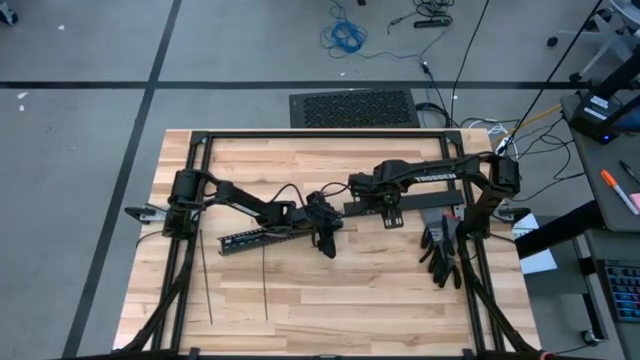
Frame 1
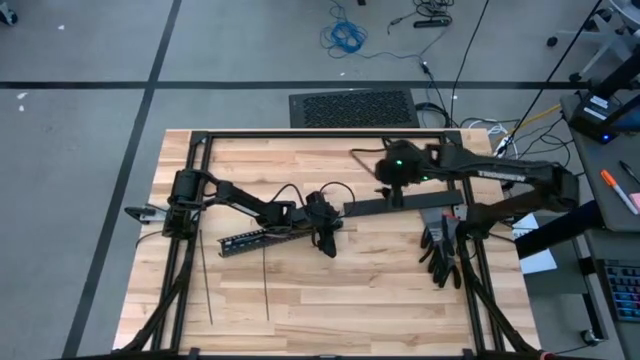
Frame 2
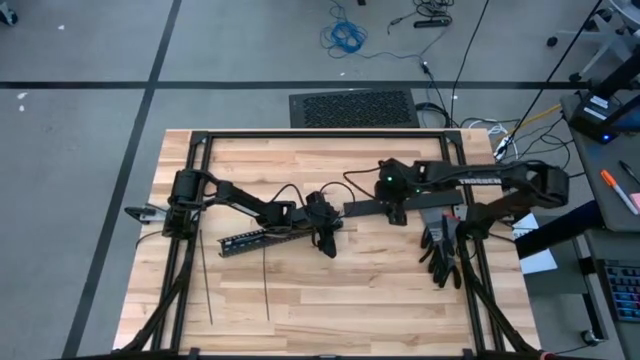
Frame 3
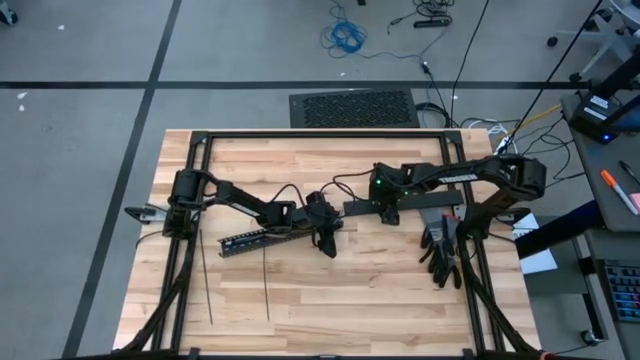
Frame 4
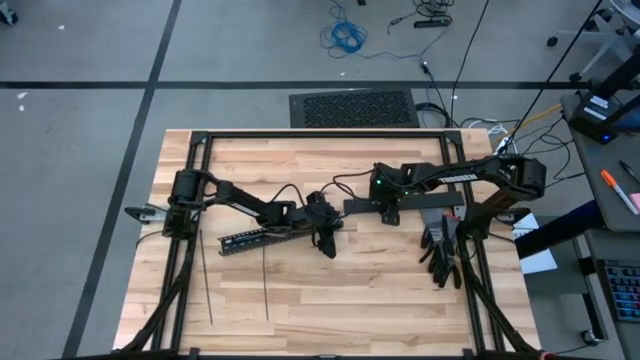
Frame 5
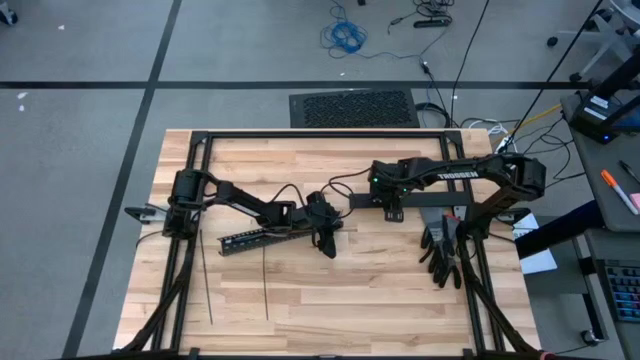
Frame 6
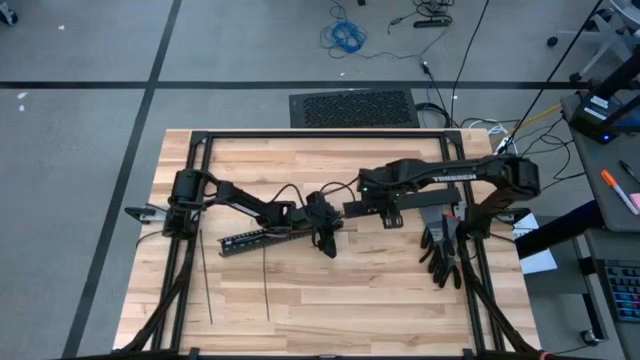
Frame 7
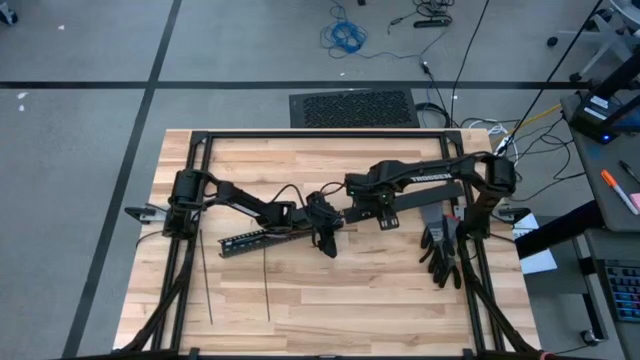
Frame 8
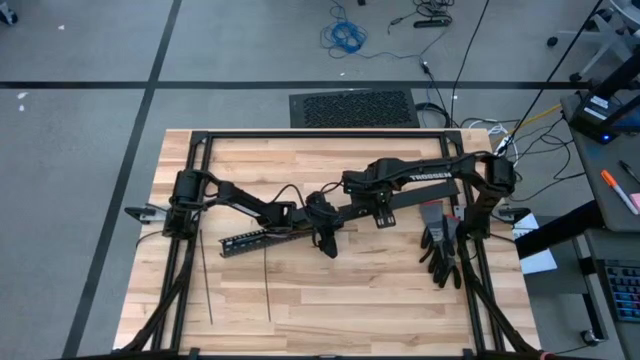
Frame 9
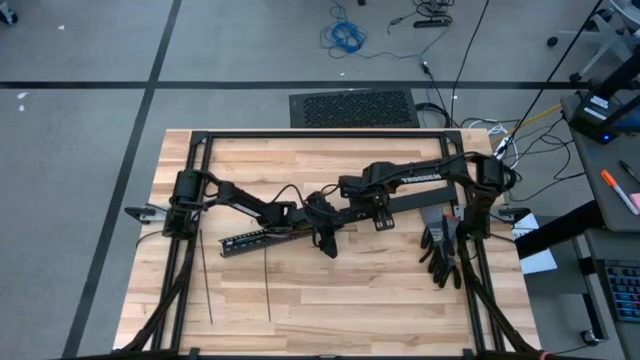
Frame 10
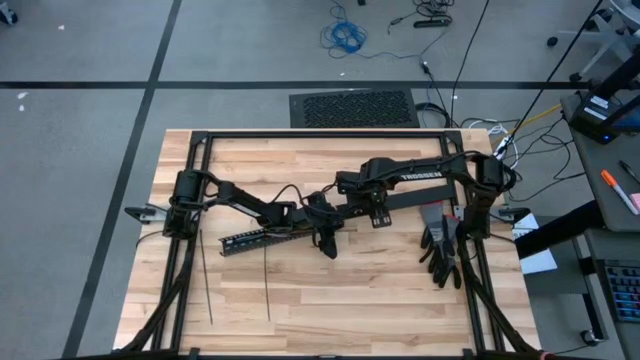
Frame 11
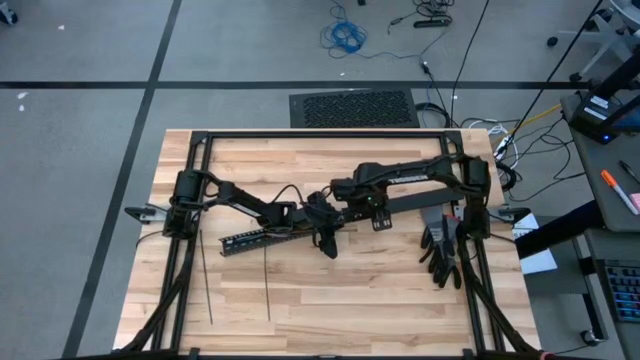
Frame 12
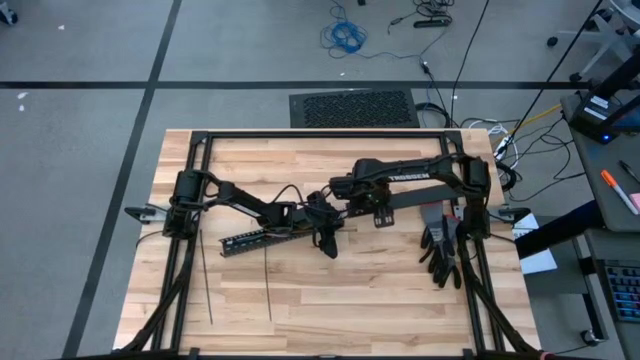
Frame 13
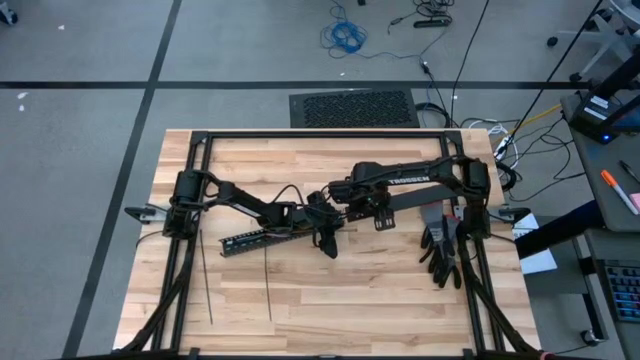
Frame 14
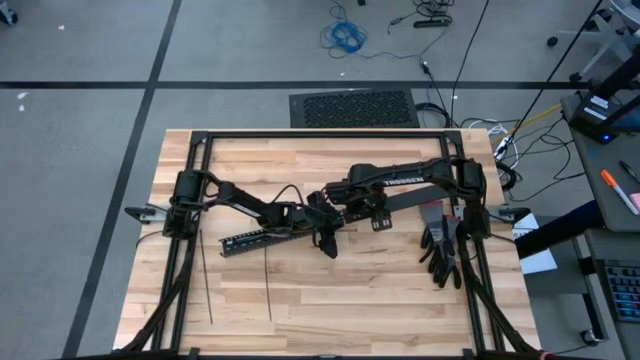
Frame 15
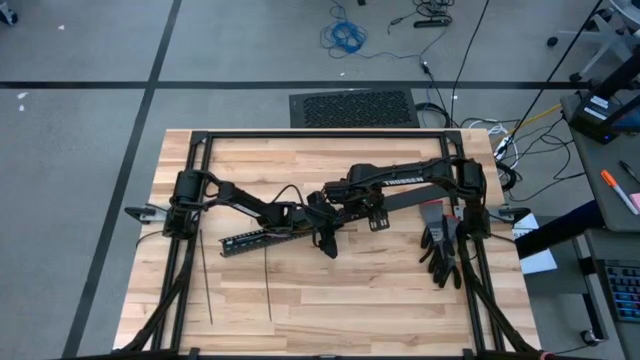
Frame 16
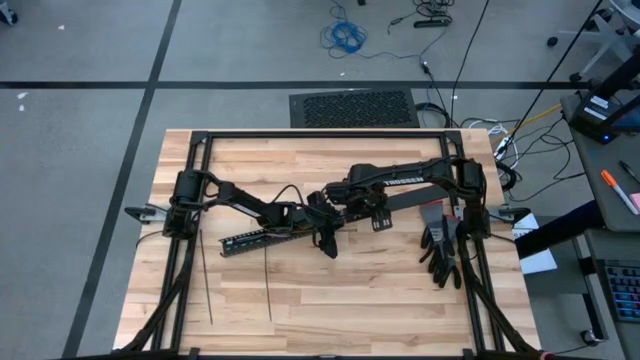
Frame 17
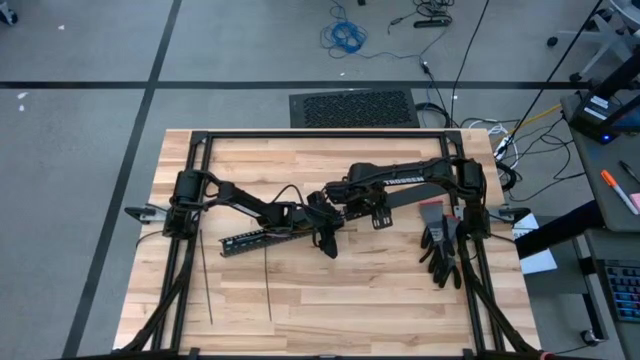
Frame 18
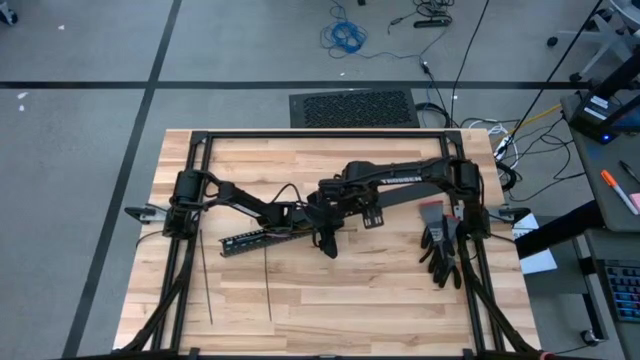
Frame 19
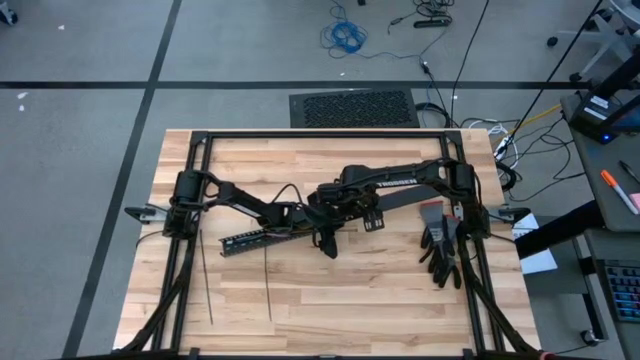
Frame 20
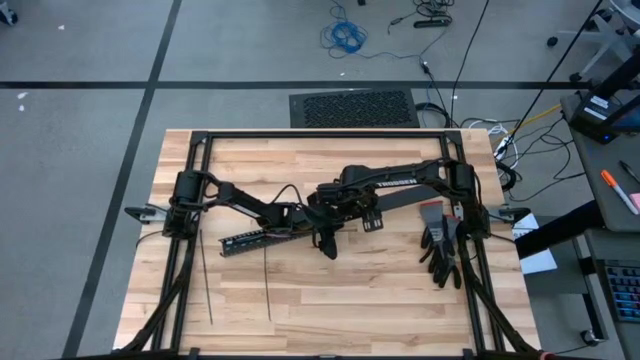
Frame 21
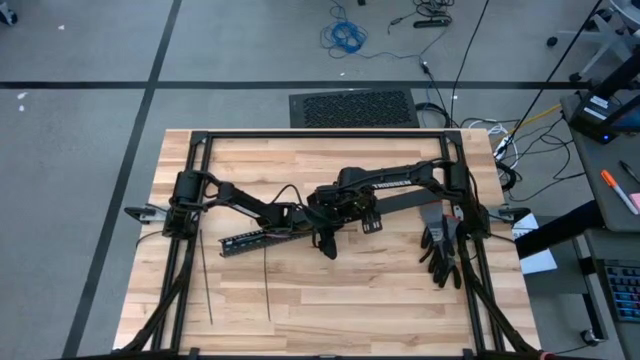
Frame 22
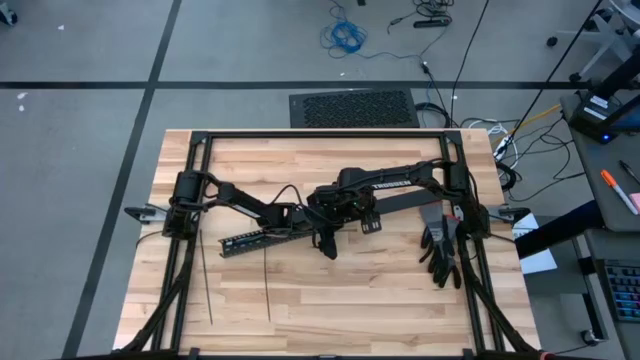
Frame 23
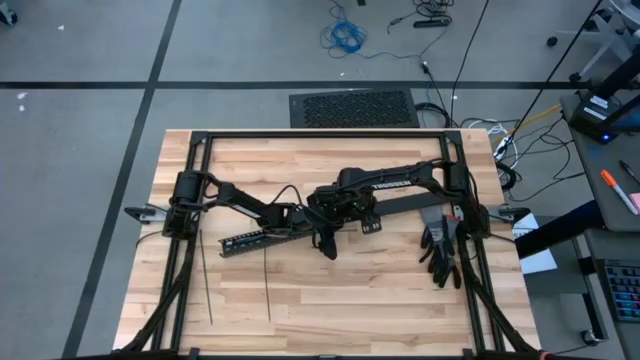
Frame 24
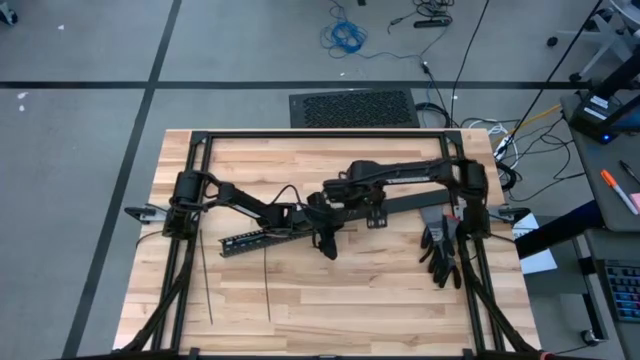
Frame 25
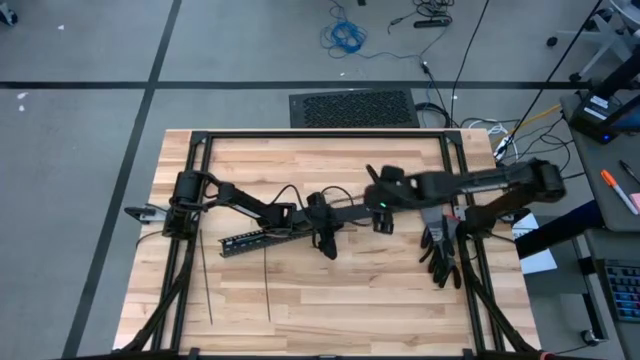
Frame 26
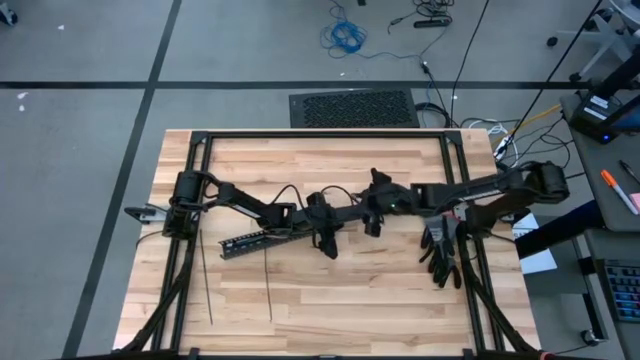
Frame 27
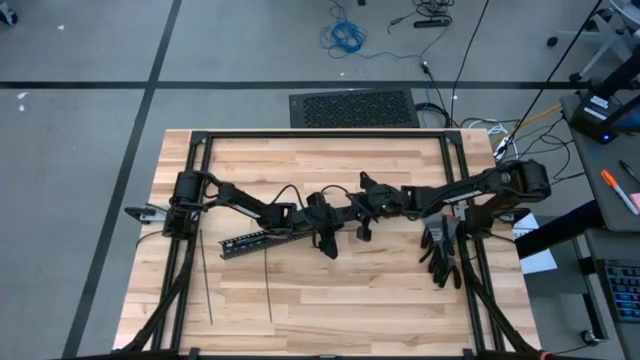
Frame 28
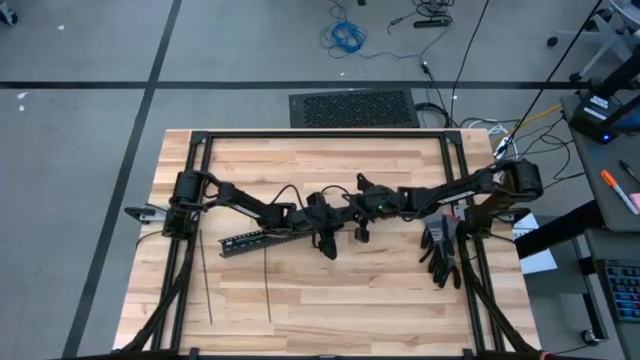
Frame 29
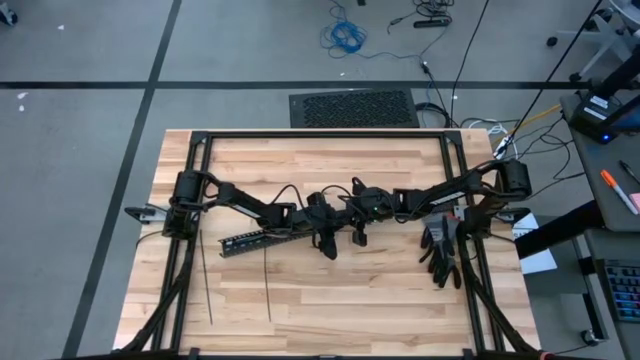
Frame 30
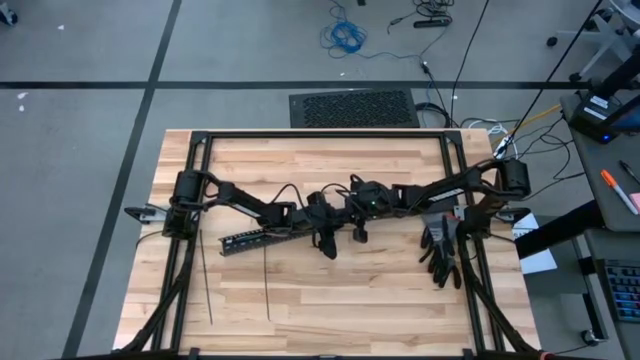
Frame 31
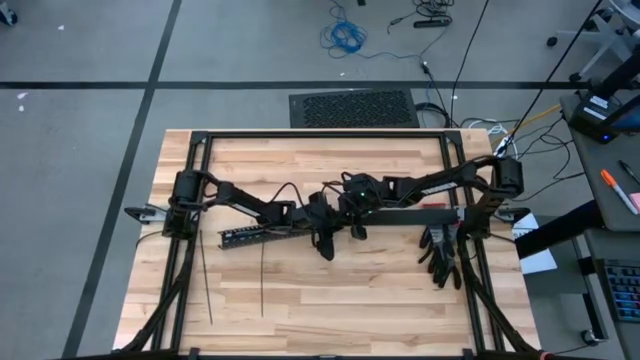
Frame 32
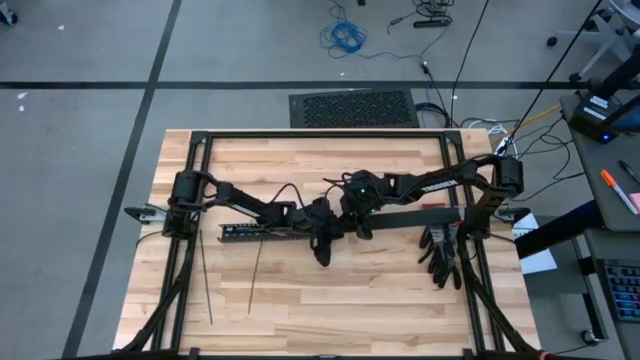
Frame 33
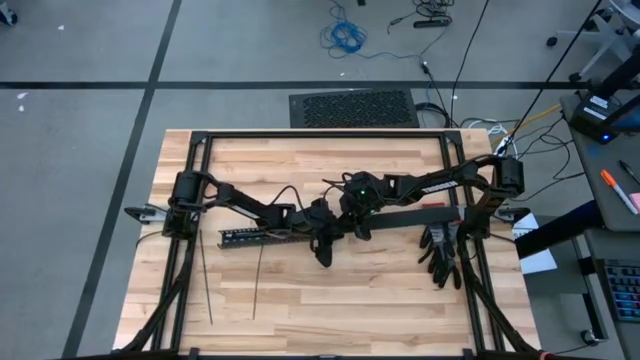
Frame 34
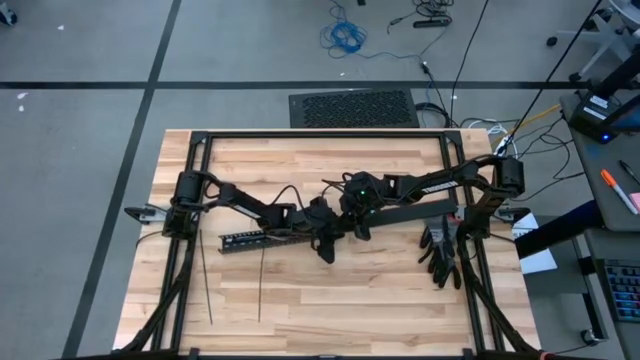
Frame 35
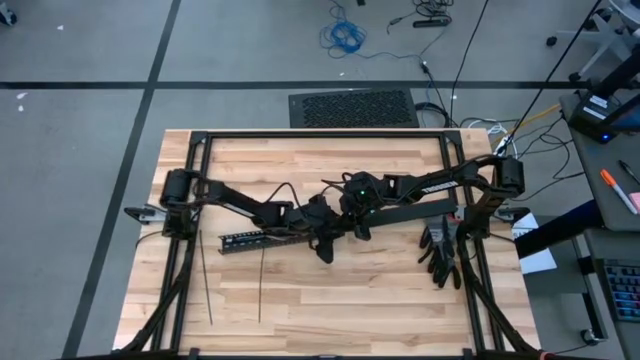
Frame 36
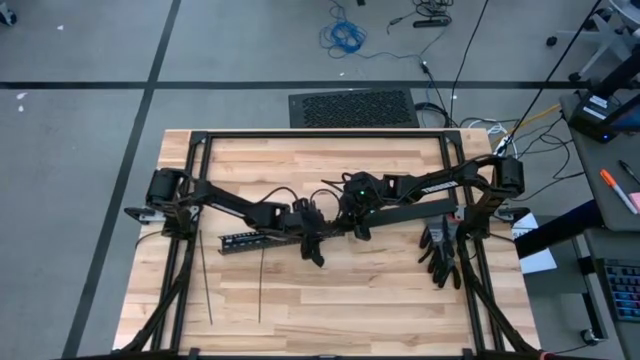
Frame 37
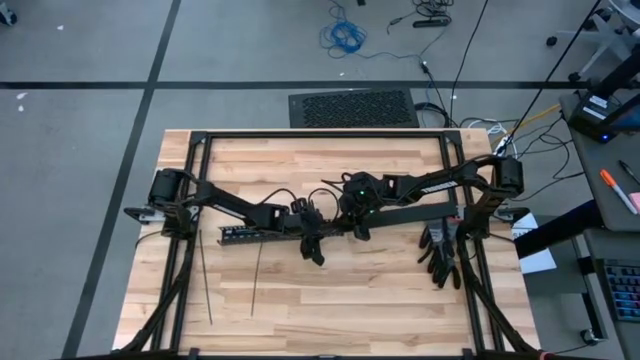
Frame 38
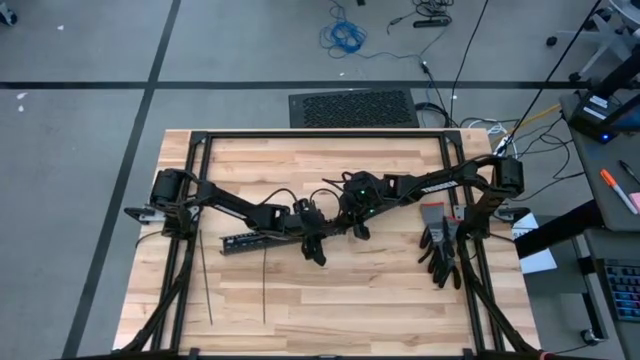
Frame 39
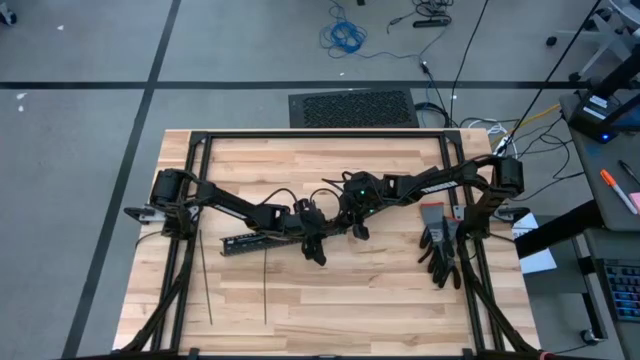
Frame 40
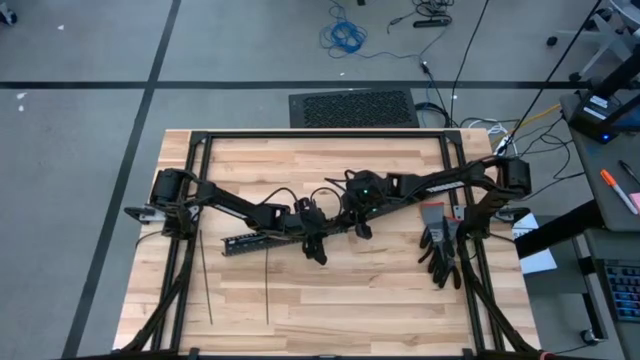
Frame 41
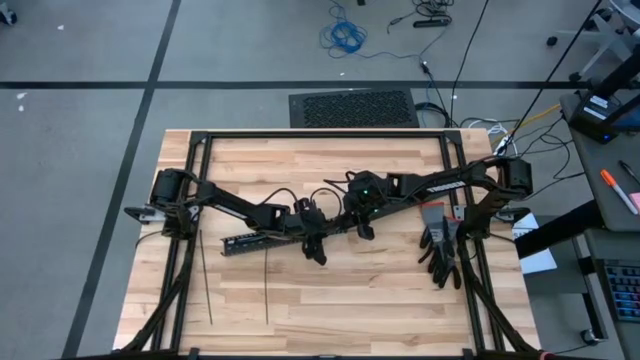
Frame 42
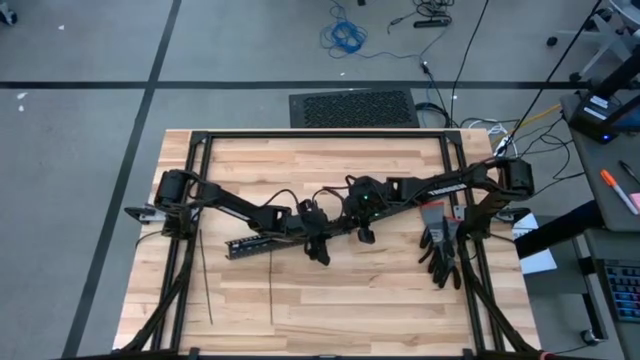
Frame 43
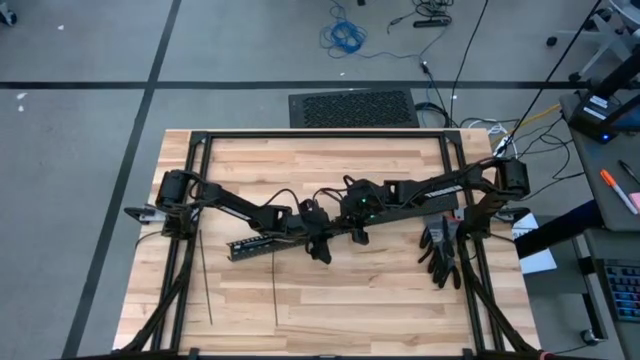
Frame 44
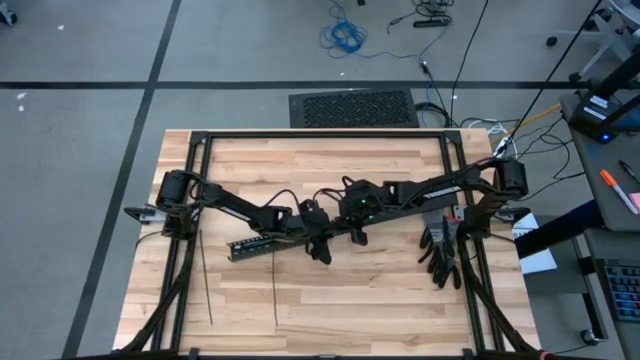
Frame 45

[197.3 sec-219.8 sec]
Task: Ziptie cables
Close the black cable duct with the cable duct cover
